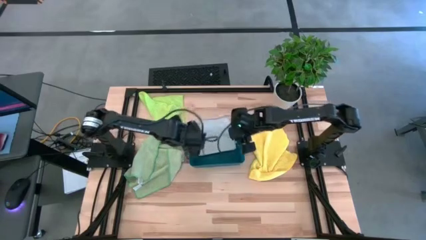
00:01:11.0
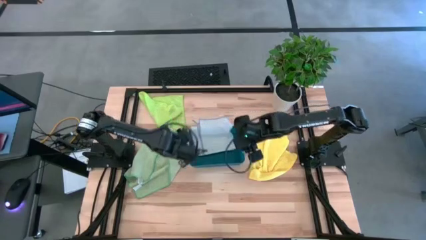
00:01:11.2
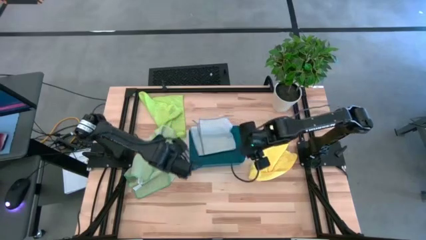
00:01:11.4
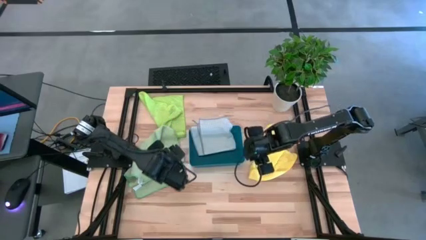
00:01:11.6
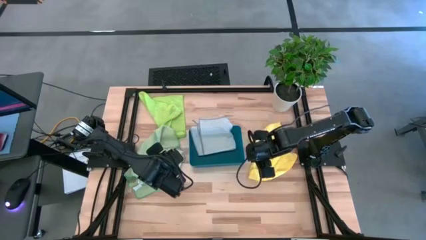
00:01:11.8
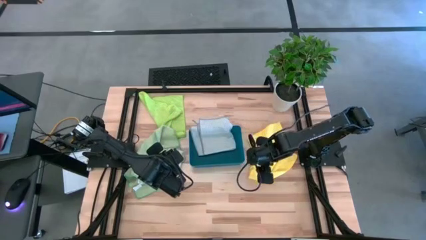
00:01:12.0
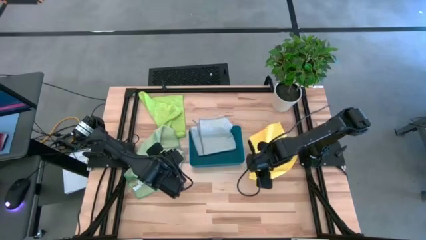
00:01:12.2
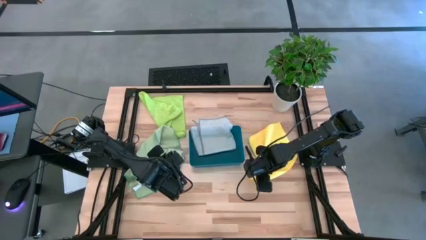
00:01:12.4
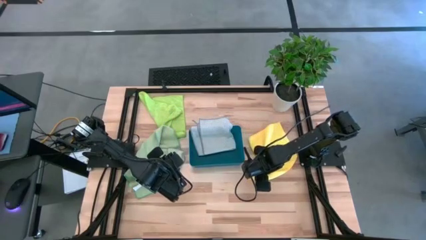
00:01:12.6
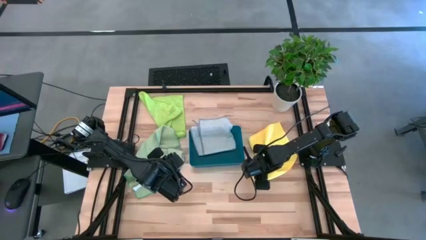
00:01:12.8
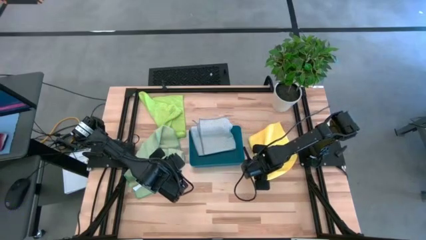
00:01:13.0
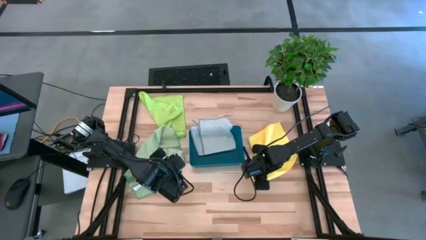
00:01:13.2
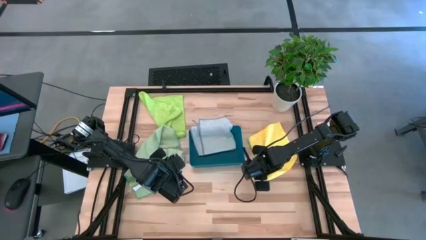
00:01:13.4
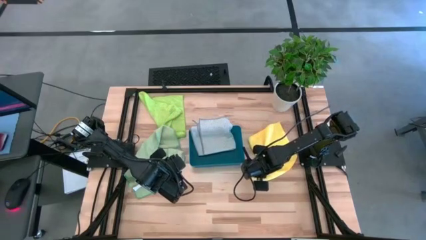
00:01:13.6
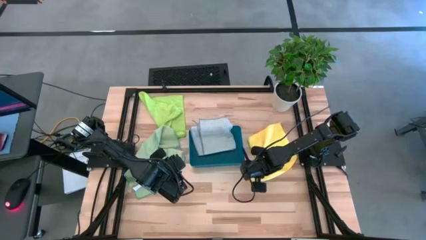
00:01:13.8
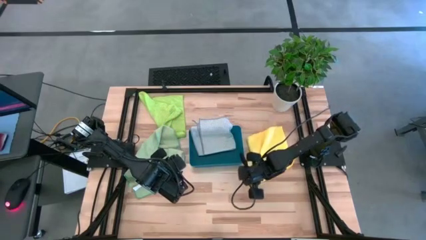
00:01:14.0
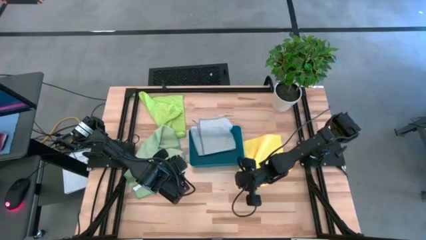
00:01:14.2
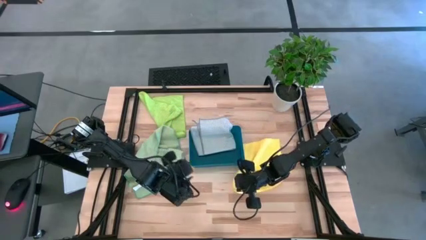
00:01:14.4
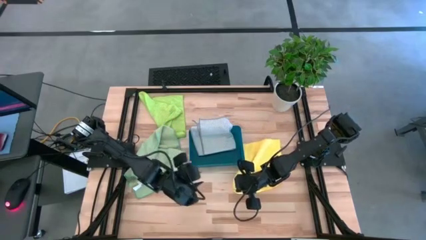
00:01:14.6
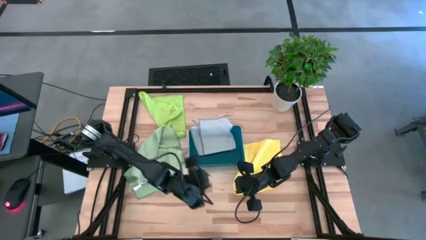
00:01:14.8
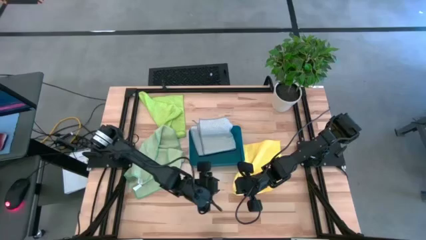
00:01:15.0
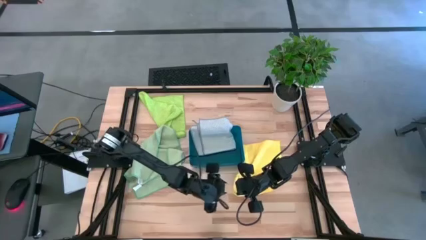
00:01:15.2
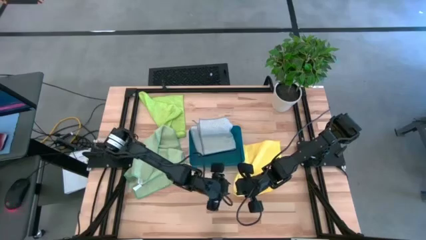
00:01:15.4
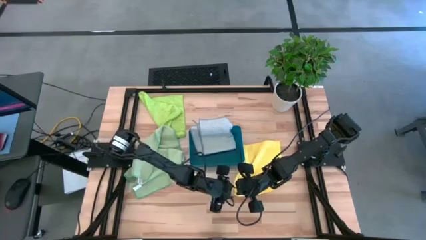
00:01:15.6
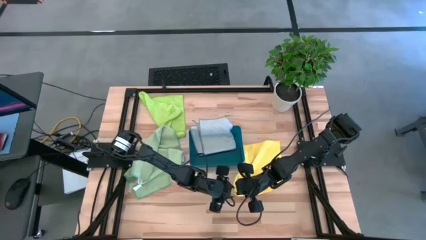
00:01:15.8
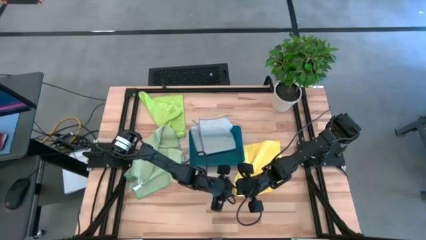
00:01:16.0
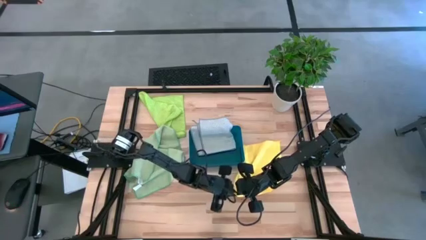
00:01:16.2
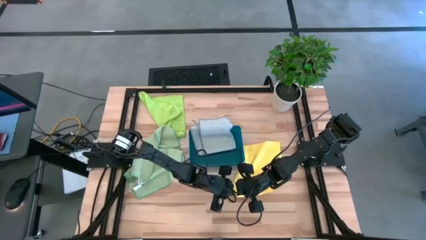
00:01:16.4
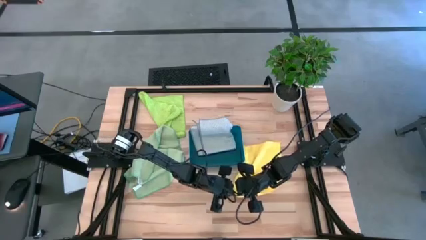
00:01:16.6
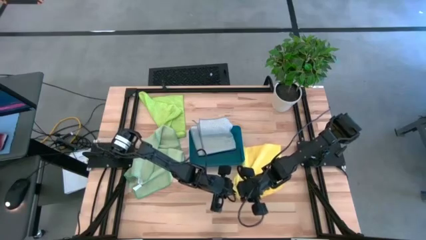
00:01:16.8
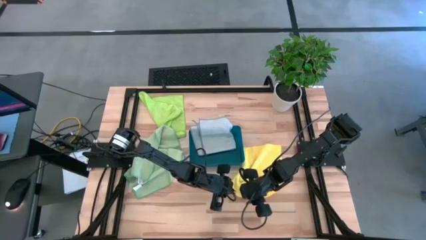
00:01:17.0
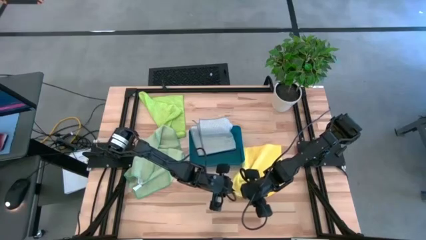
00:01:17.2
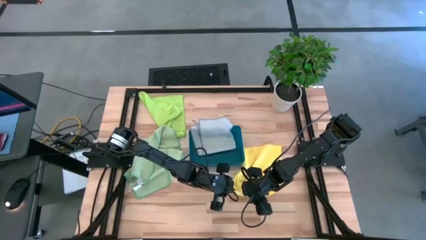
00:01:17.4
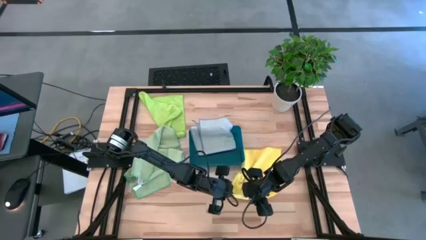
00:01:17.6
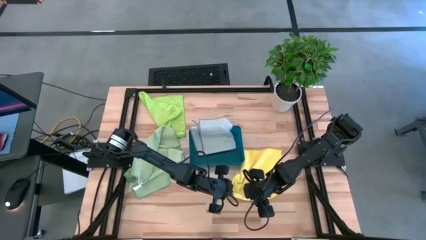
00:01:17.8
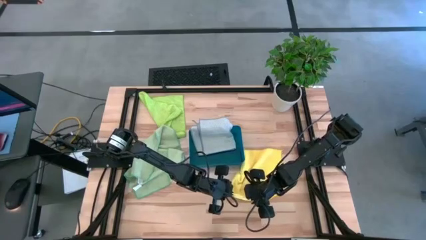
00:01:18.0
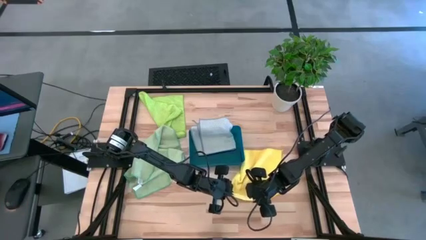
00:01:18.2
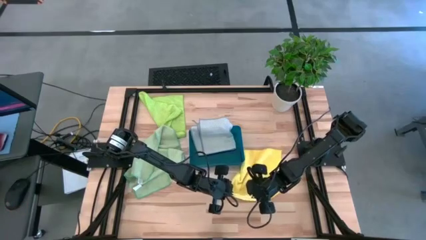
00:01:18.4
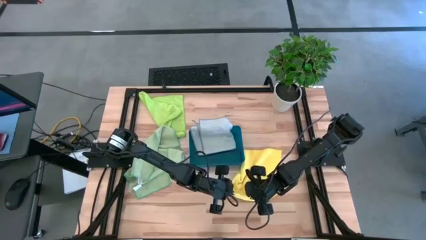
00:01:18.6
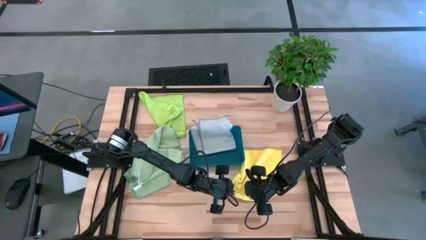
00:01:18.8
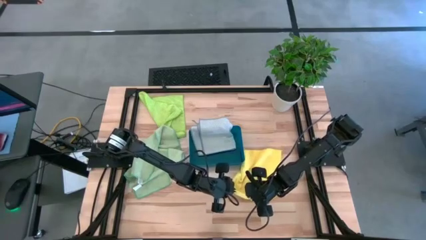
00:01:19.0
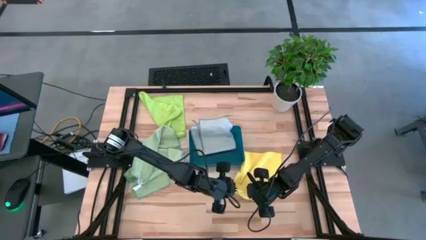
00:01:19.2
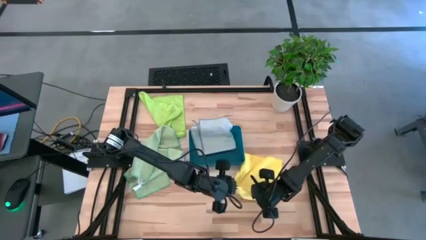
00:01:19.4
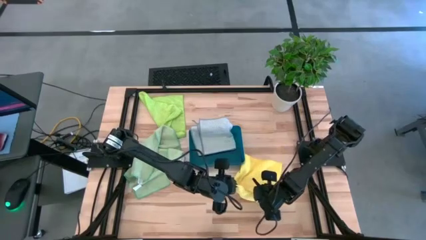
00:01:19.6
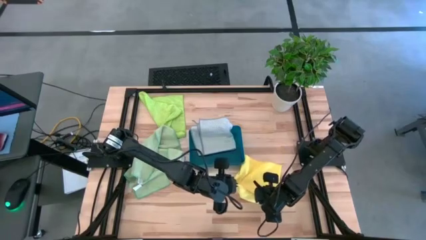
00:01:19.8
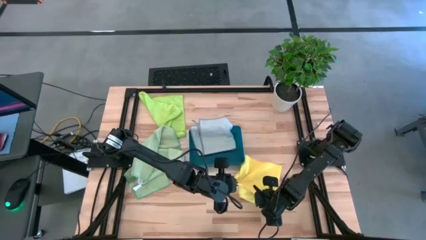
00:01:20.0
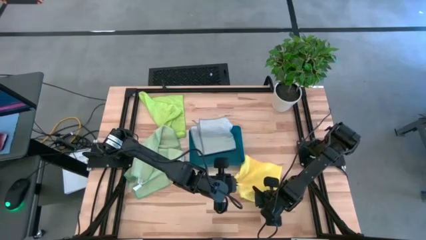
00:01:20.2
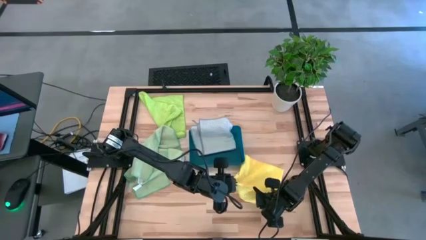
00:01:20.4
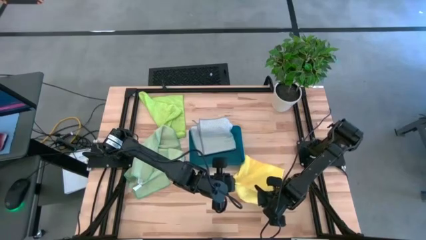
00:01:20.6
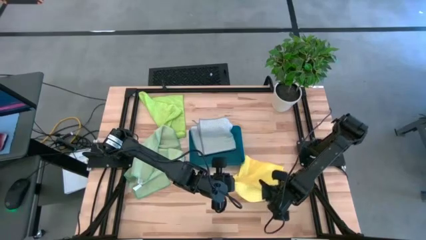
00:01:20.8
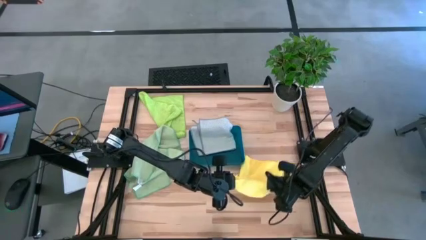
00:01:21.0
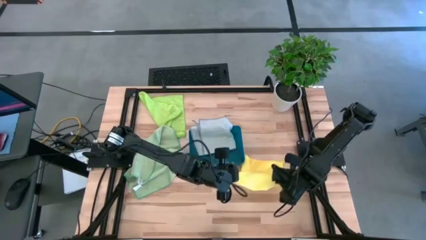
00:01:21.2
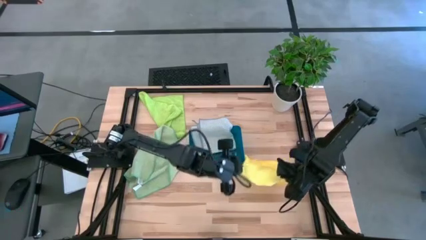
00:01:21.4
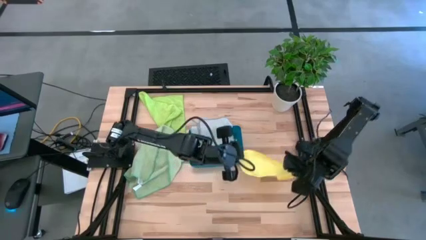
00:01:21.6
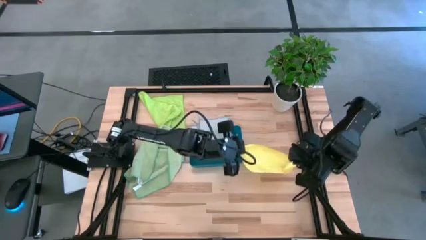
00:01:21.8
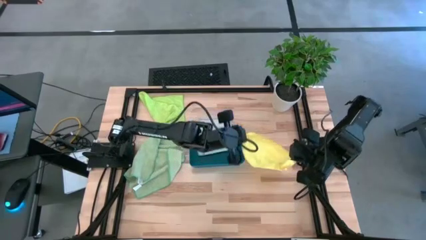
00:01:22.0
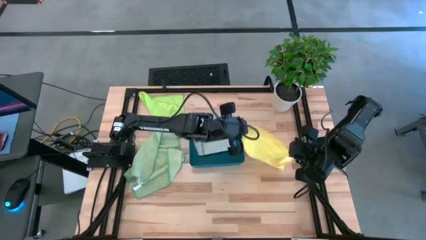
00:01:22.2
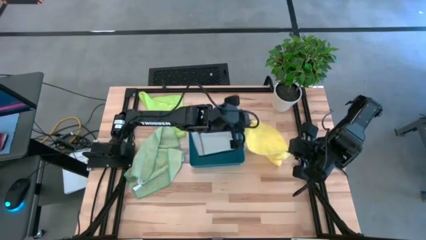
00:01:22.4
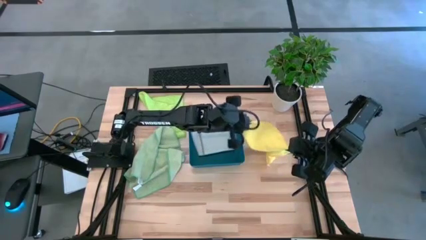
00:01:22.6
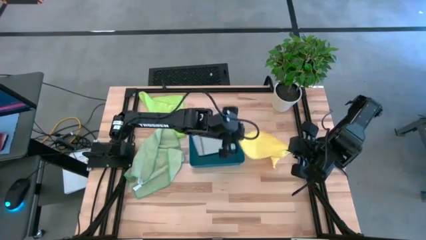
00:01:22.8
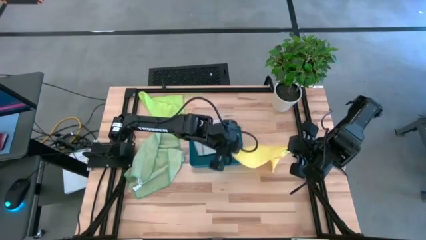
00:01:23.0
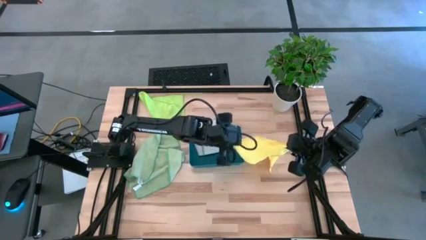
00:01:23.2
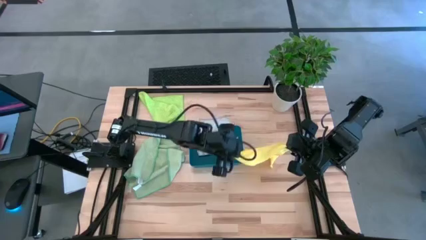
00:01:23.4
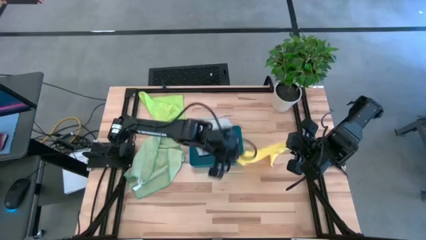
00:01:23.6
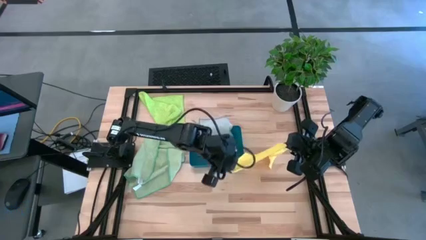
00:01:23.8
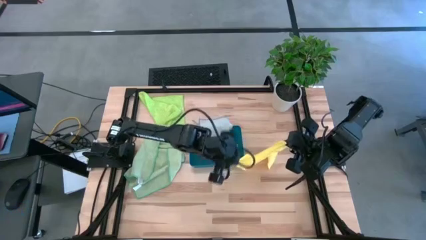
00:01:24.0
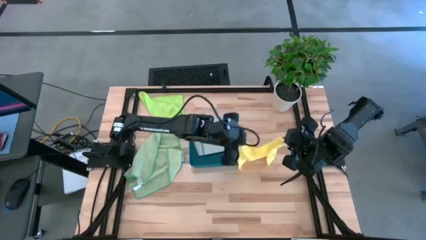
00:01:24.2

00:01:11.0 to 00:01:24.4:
Task: Fold microfiber towels
Fold the yellow microfiber towel

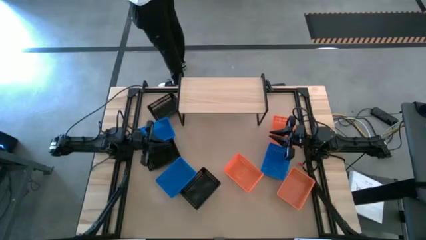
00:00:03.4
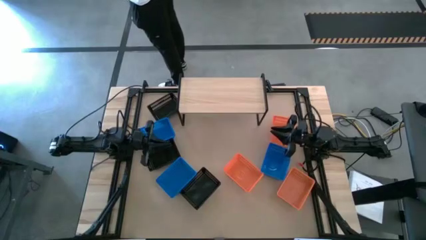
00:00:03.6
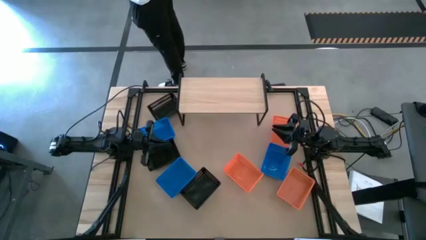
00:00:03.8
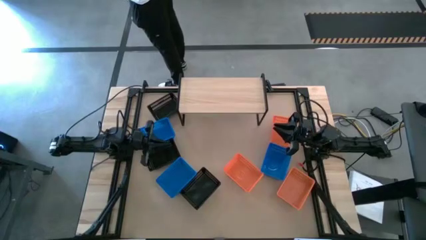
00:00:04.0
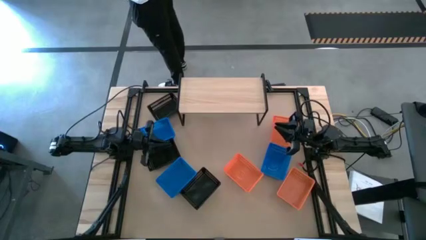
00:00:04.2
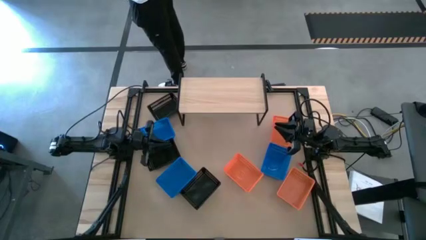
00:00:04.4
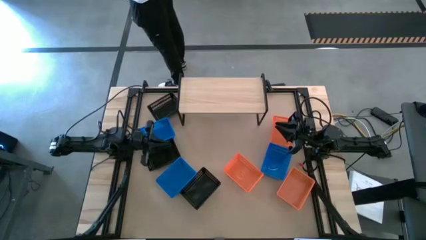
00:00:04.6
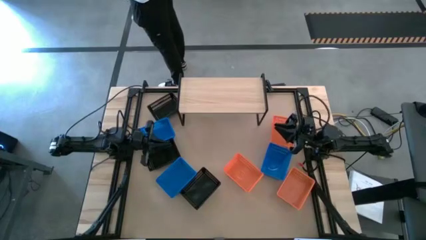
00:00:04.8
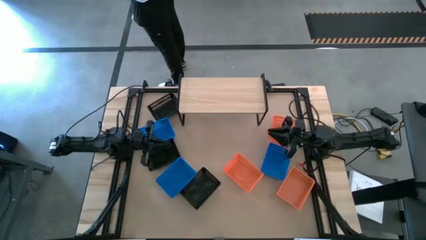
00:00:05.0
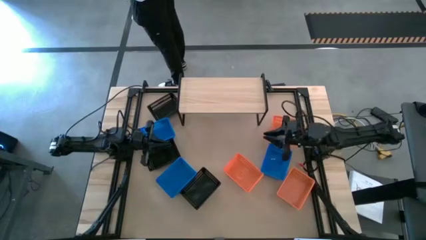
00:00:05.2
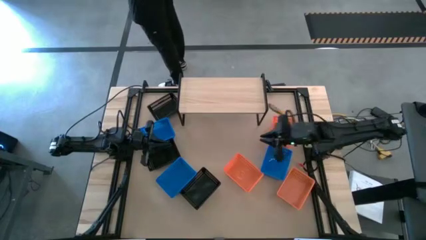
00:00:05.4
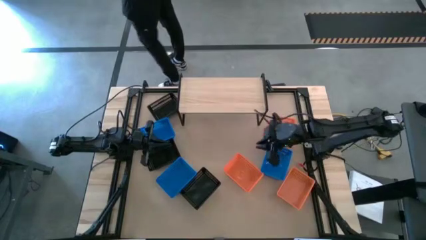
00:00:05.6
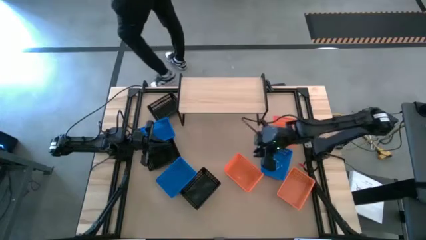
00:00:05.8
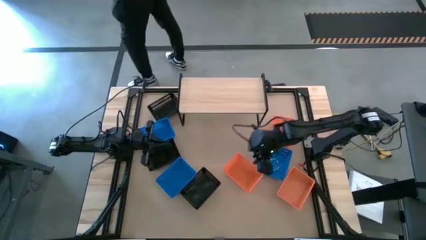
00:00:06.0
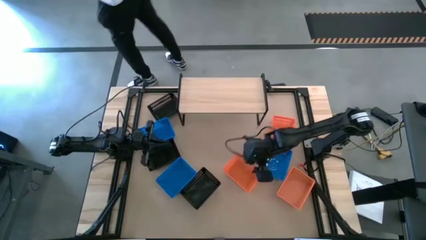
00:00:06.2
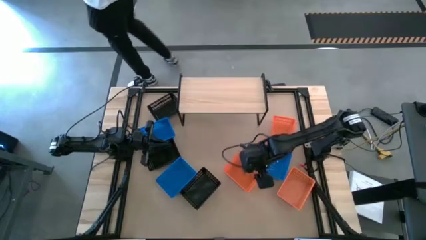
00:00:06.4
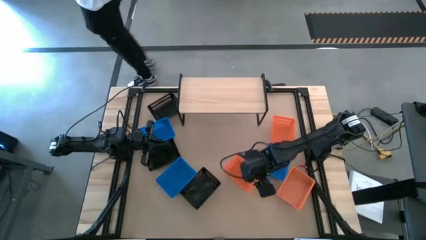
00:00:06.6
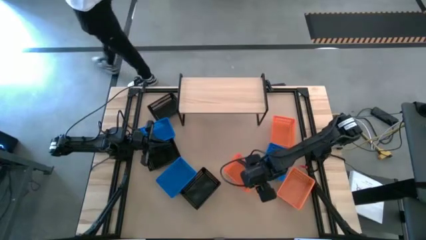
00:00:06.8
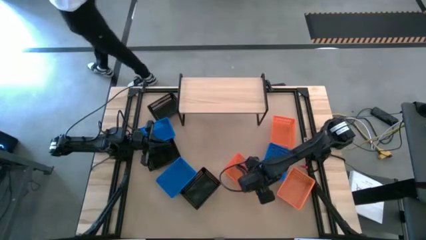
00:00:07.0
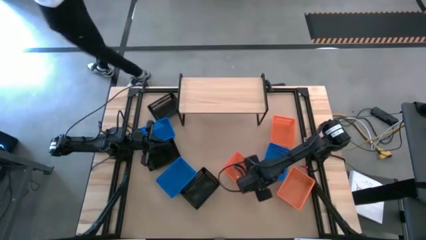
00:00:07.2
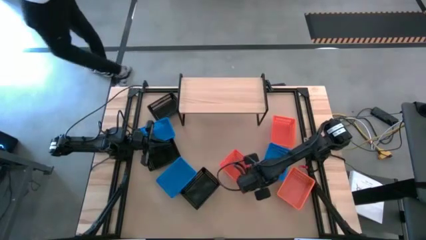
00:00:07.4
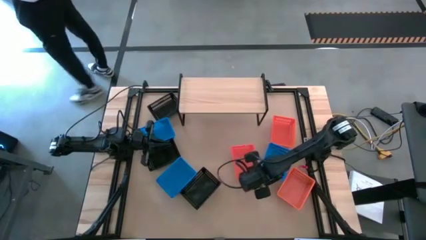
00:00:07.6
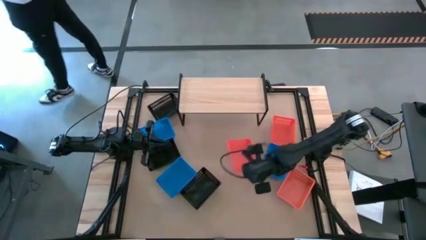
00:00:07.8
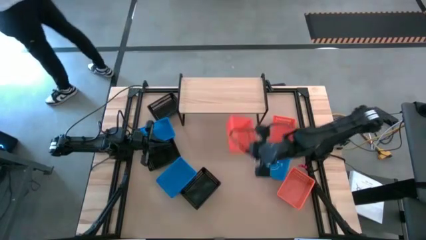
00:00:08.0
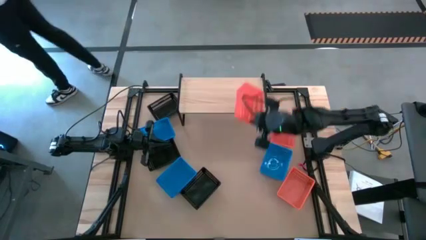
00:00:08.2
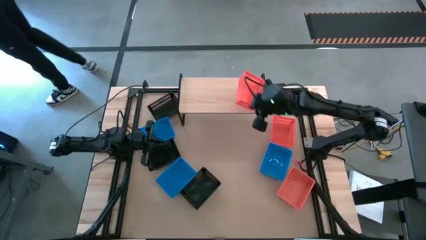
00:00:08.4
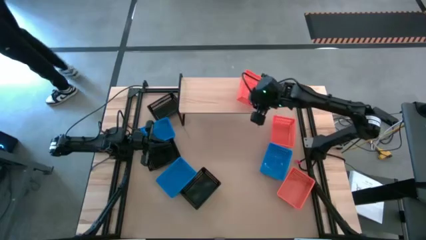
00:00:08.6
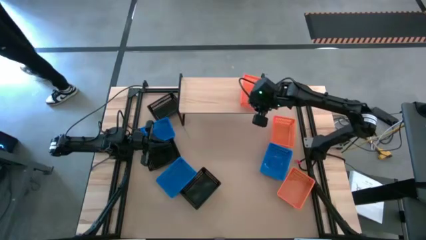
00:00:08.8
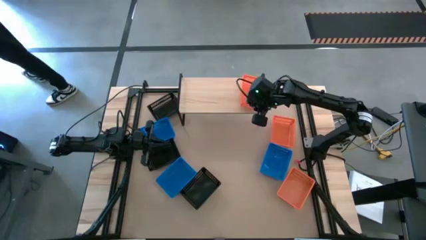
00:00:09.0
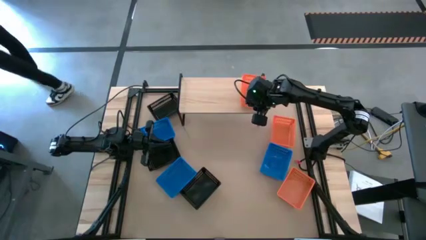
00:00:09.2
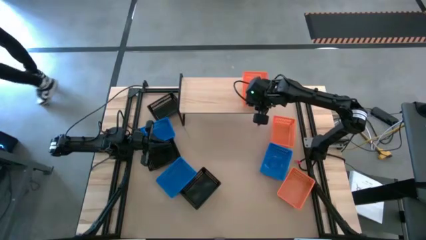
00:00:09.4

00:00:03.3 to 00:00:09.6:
Task: Stack baskets on shelf by color
Put the left orange basket on the shelf
